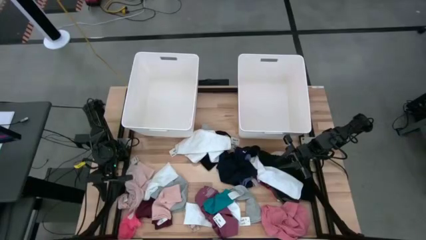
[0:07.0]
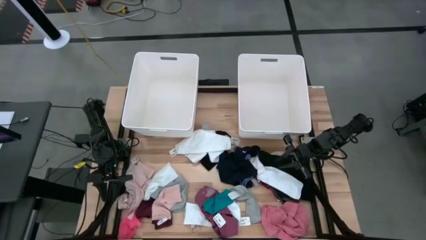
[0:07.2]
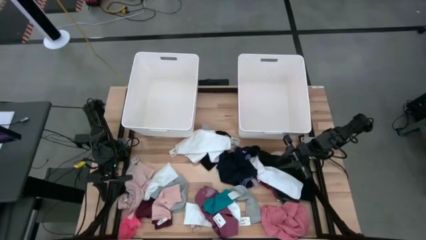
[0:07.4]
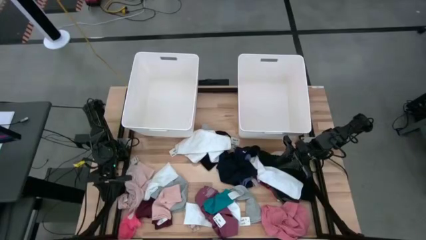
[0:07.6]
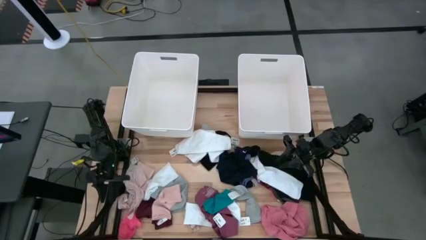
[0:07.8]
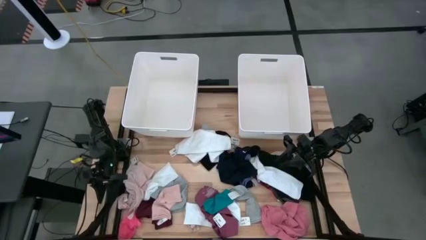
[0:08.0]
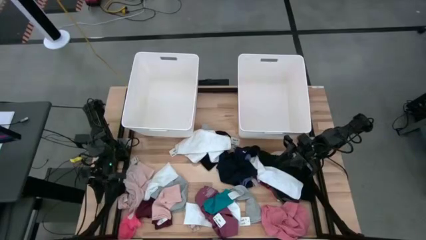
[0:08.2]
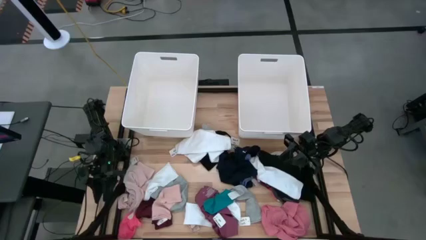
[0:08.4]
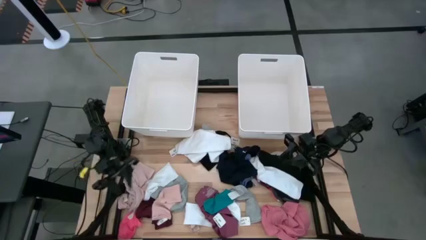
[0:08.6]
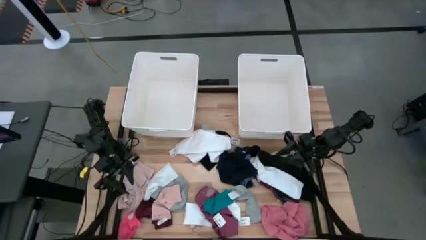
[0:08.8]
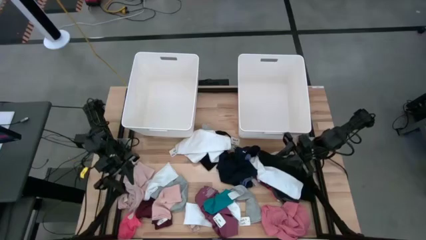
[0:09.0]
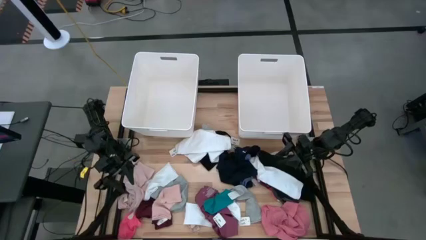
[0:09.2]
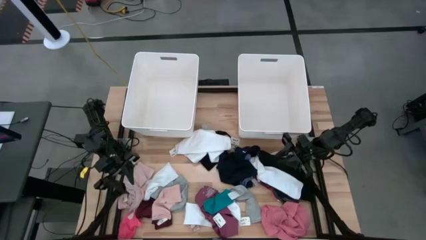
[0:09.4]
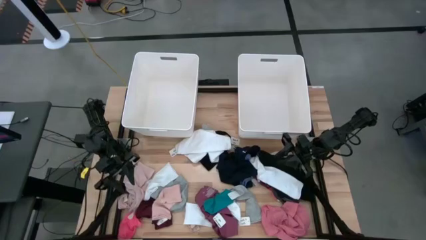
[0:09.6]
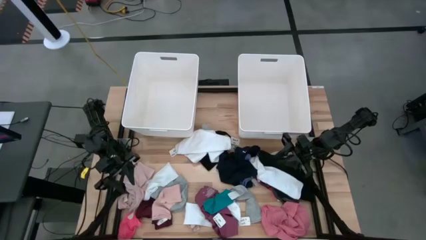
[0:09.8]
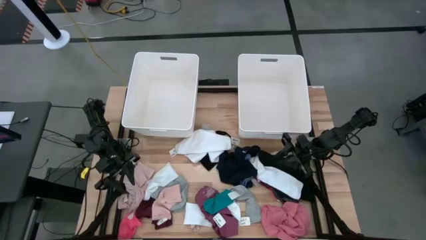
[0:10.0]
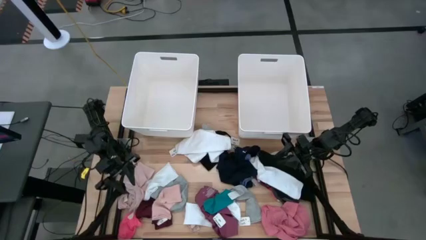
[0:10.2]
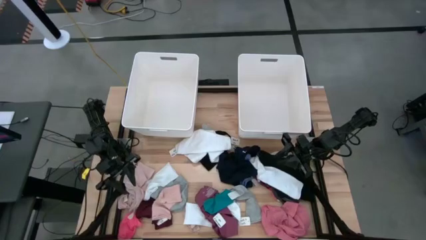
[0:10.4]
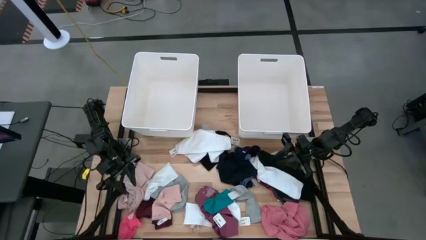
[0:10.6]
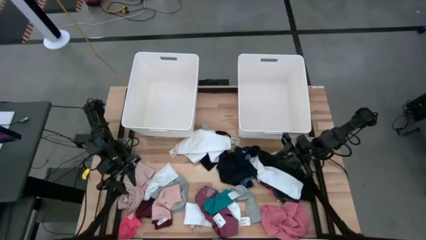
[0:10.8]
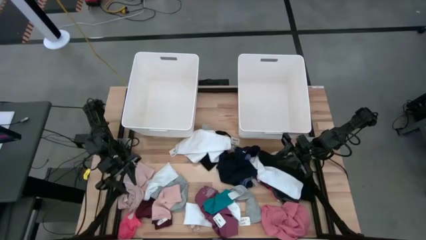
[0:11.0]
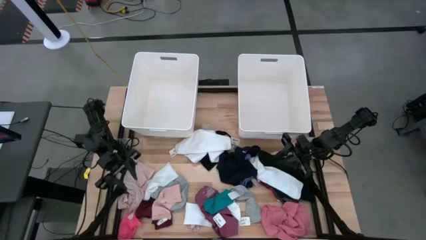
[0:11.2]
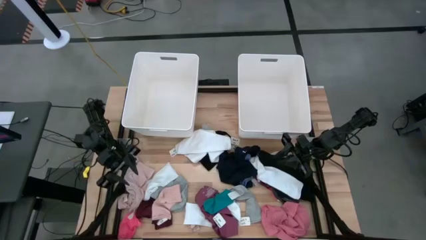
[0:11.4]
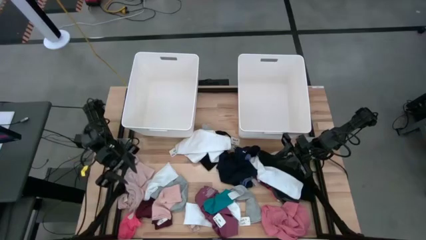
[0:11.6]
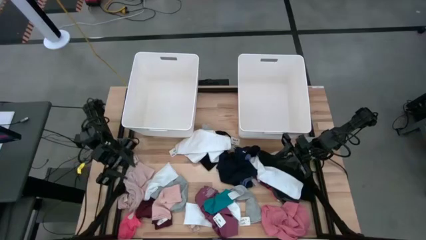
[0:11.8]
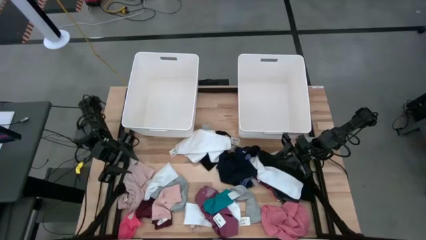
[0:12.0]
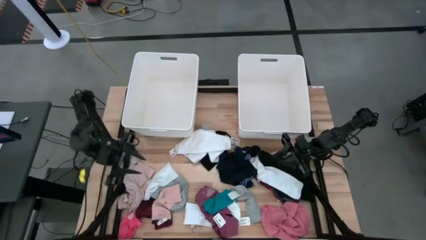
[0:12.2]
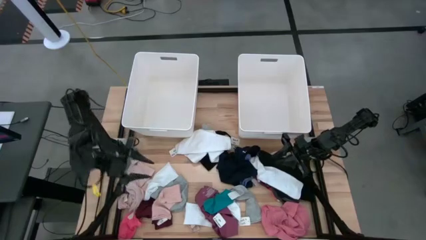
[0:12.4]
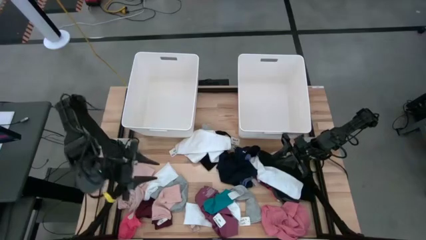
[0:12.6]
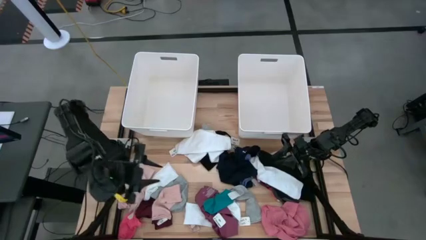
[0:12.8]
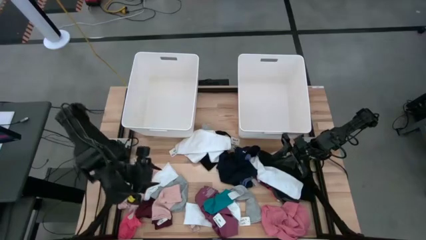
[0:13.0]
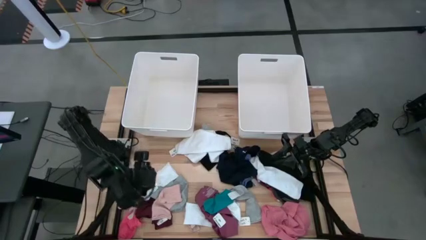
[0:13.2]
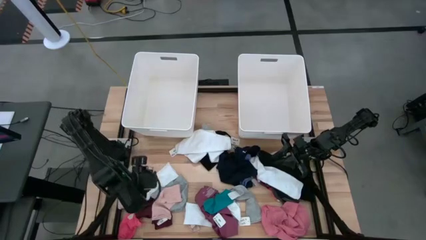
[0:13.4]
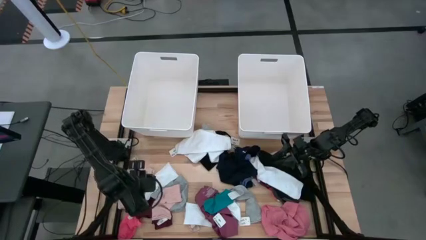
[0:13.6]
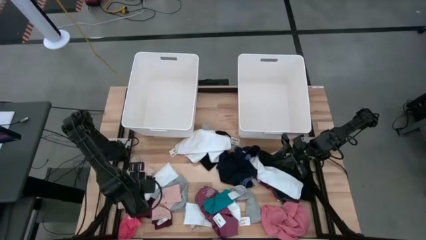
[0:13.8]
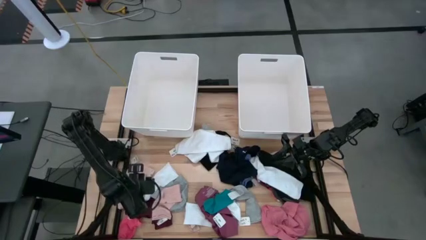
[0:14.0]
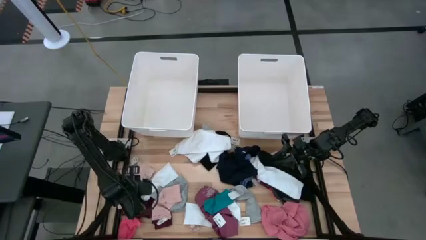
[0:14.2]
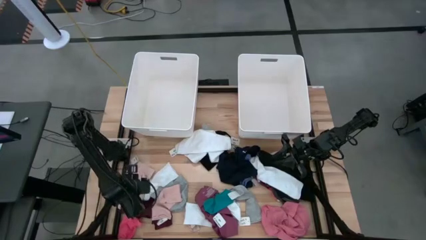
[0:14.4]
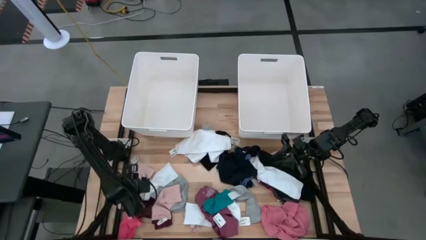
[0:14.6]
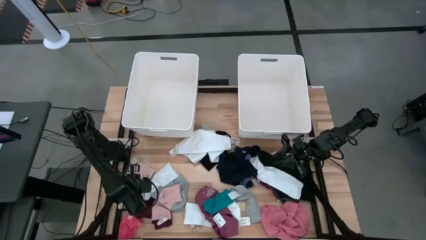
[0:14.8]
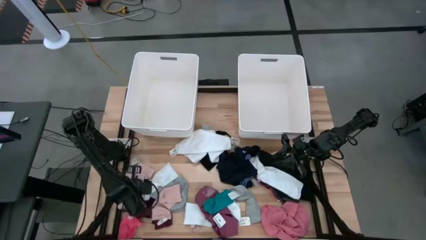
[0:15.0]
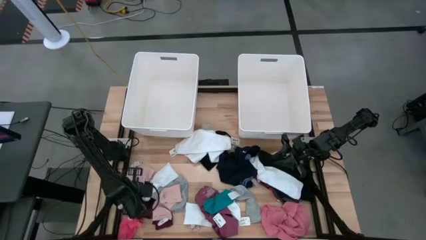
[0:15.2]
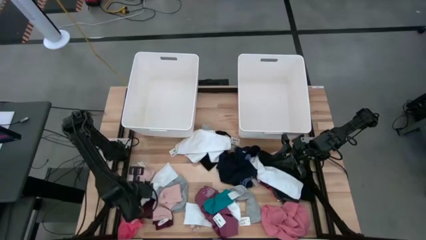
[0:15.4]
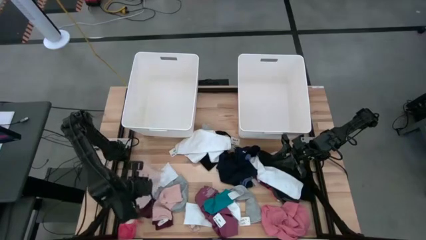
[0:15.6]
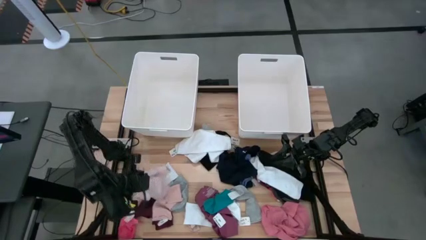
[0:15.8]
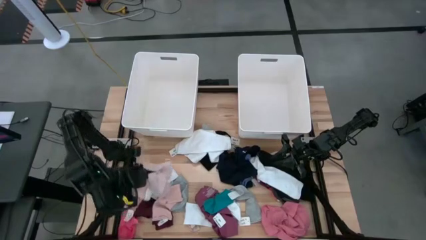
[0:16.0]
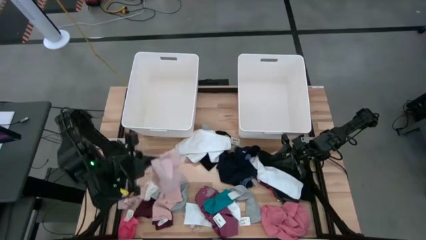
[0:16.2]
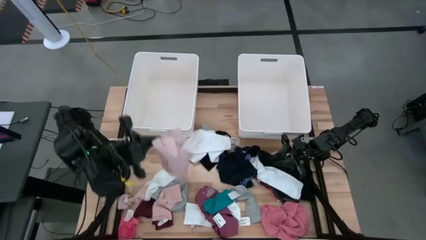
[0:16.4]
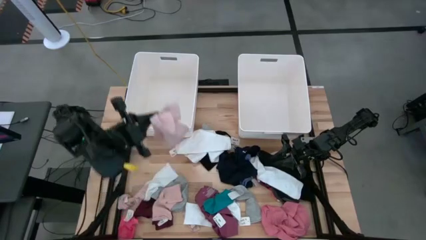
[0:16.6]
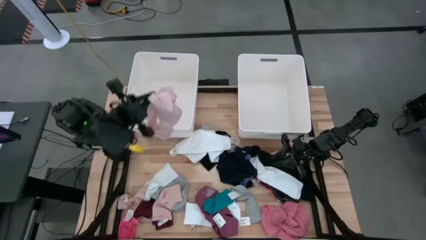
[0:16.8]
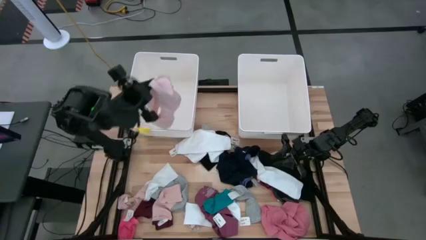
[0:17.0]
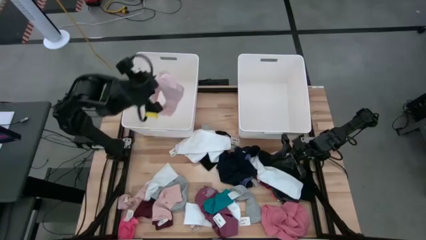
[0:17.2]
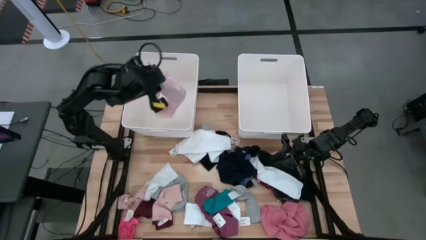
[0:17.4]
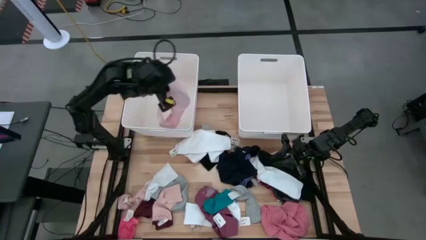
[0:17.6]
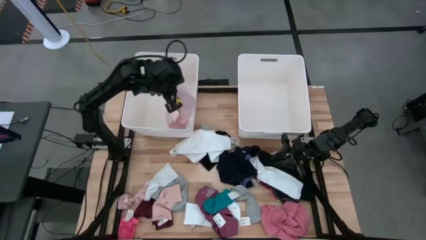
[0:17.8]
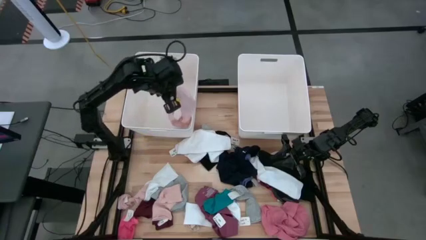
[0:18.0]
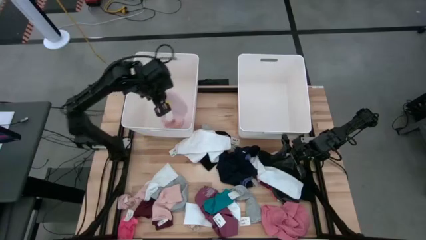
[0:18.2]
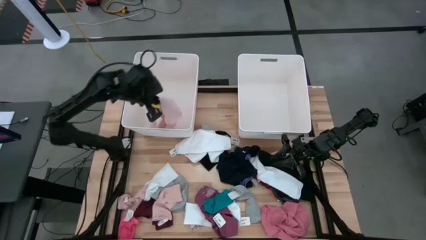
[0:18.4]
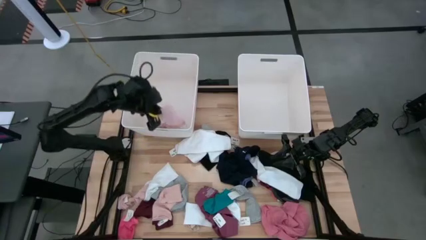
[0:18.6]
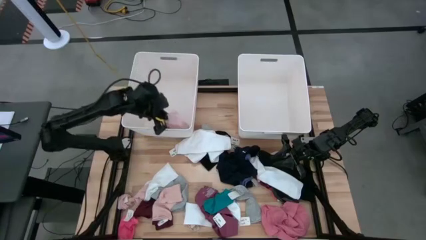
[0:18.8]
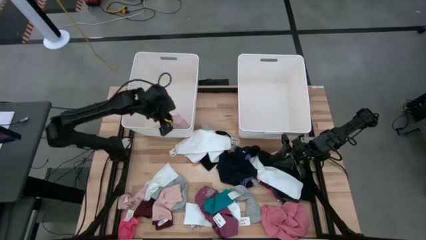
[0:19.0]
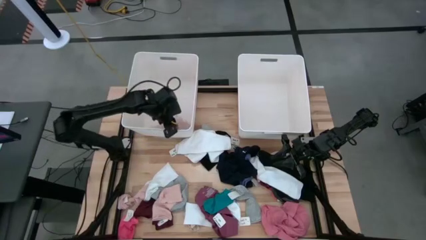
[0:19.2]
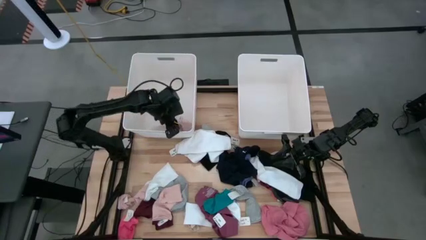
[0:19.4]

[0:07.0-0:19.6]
Task: Sort clothes
Put the light pink underwear into the left white bin

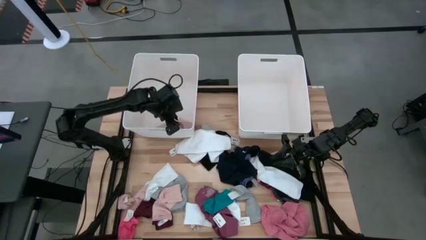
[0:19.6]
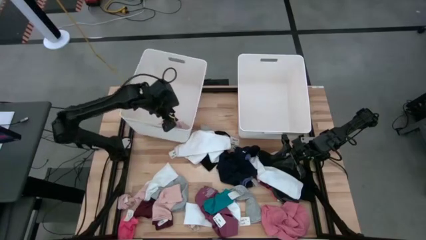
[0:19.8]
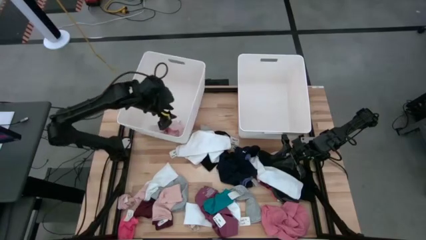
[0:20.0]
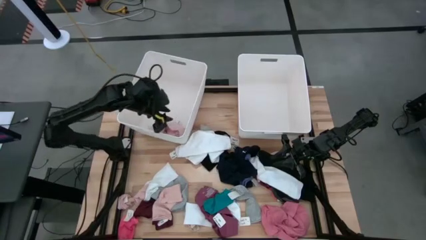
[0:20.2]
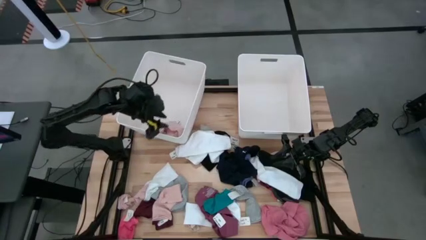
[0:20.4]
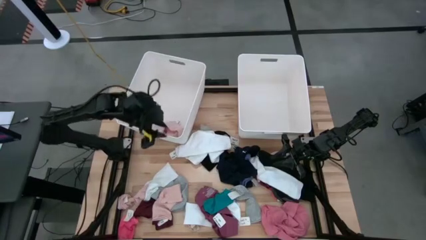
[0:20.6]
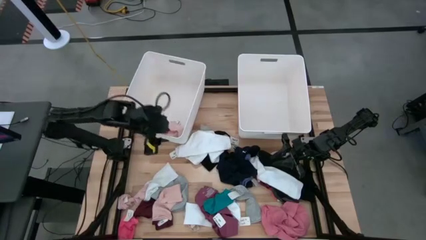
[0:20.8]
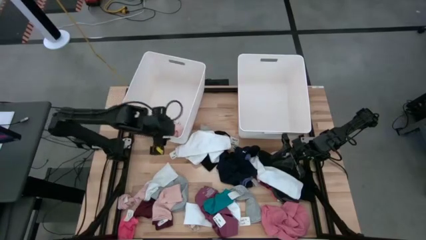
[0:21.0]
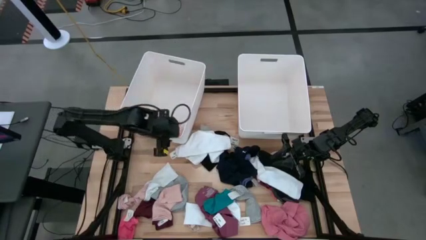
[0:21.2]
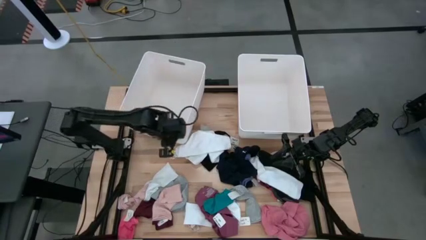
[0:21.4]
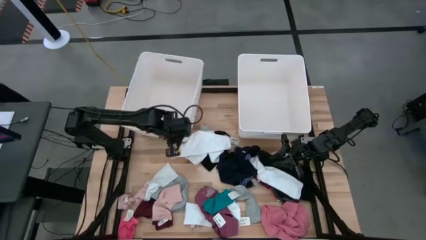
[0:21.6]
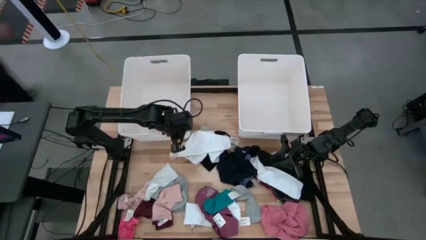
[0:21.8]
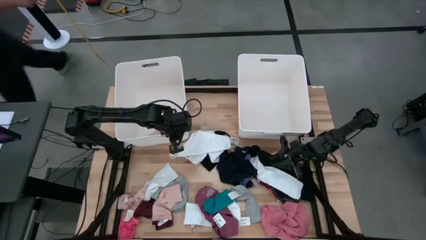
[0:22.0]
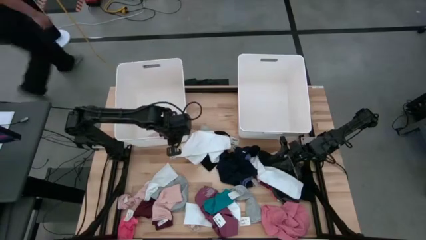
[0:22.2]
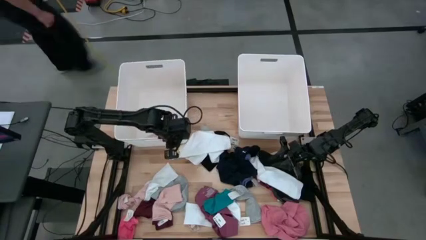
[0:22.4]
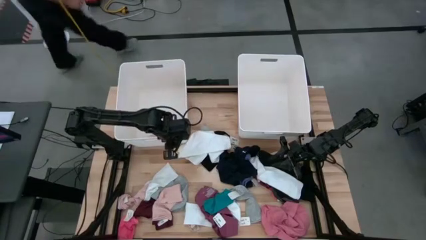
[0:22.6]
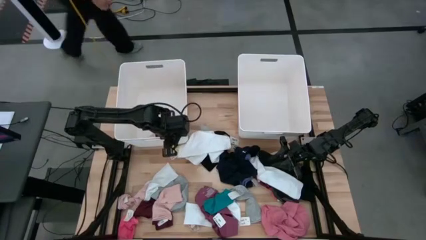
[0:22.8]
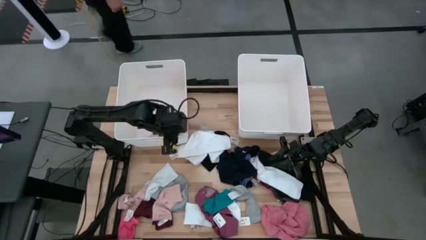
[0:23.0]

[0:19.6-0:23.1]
Adjust the left white bin
